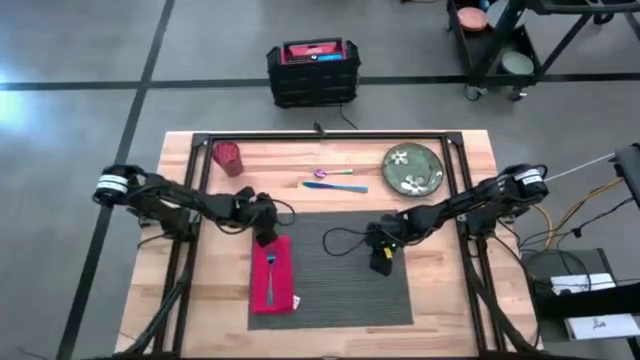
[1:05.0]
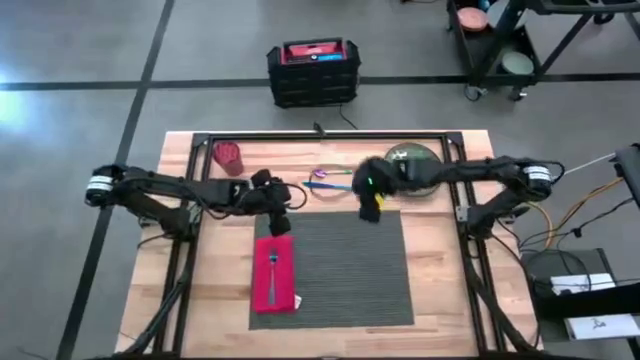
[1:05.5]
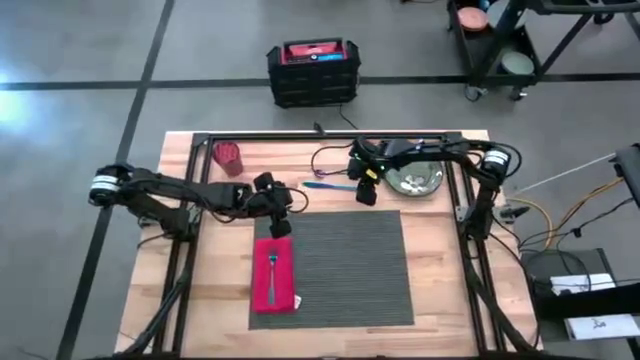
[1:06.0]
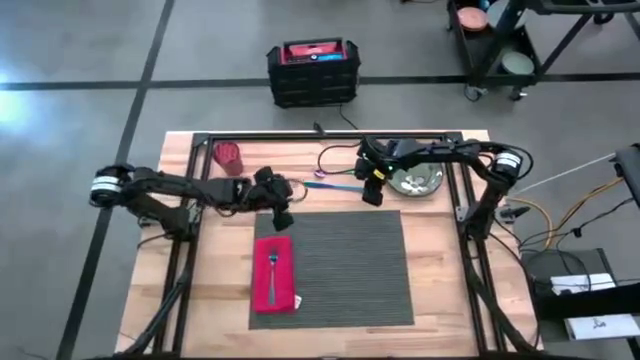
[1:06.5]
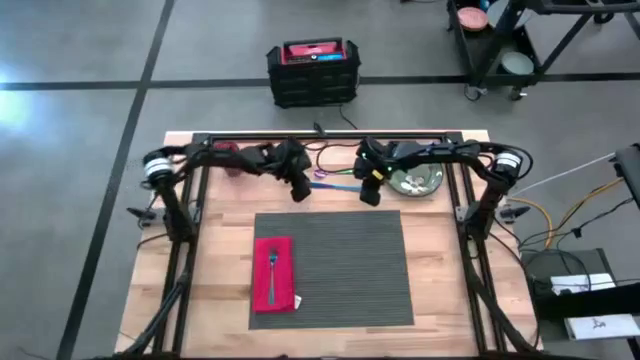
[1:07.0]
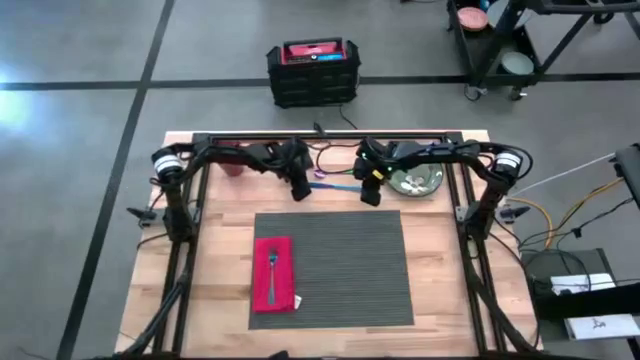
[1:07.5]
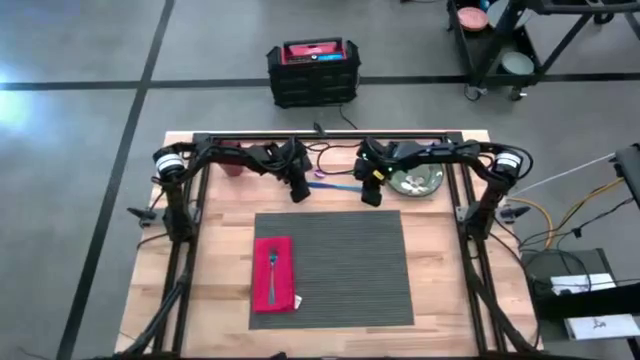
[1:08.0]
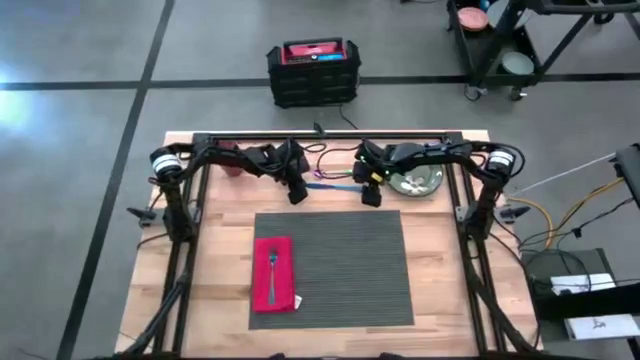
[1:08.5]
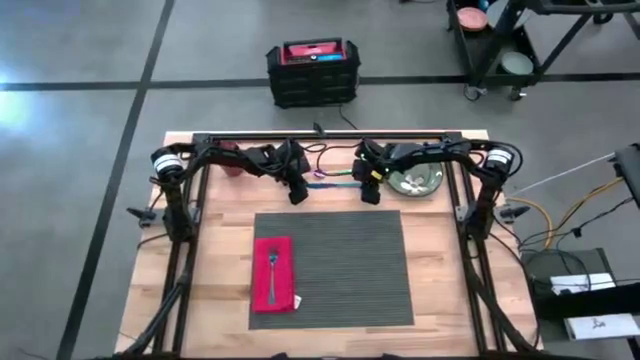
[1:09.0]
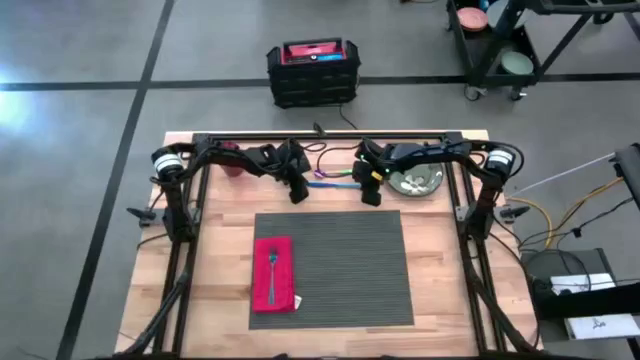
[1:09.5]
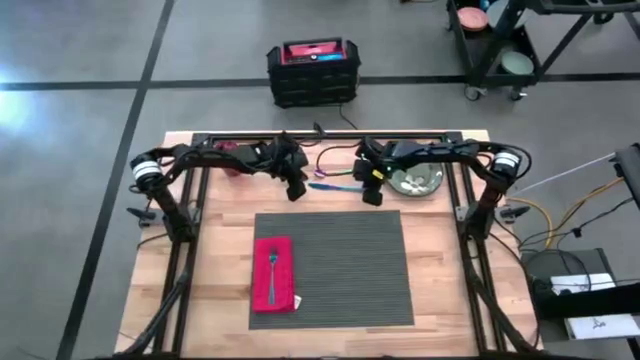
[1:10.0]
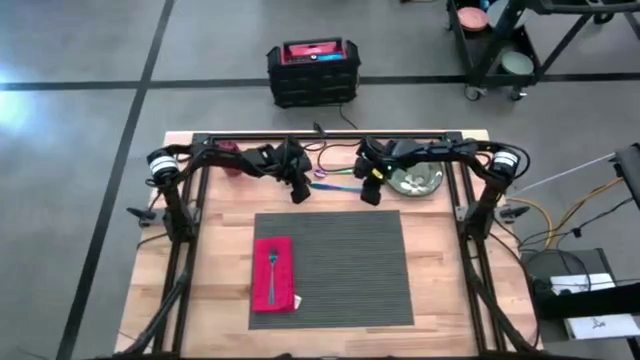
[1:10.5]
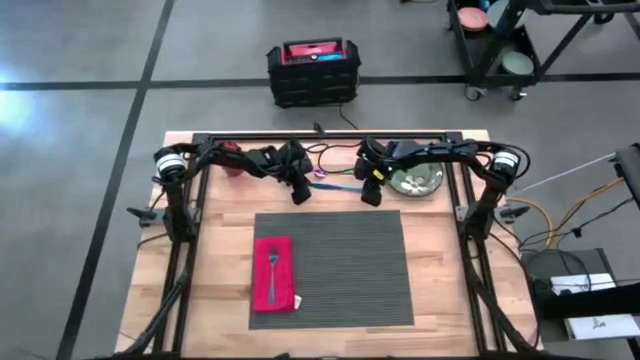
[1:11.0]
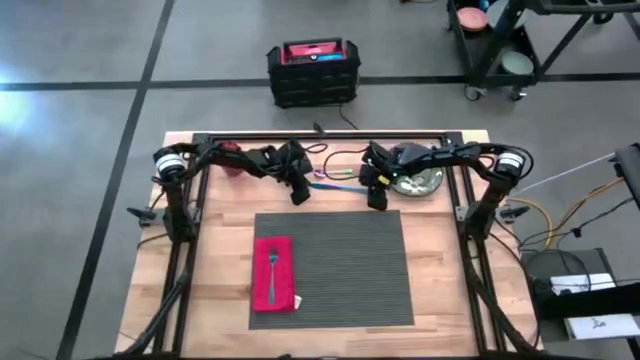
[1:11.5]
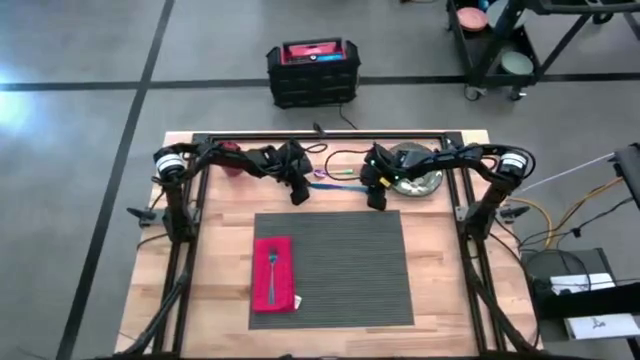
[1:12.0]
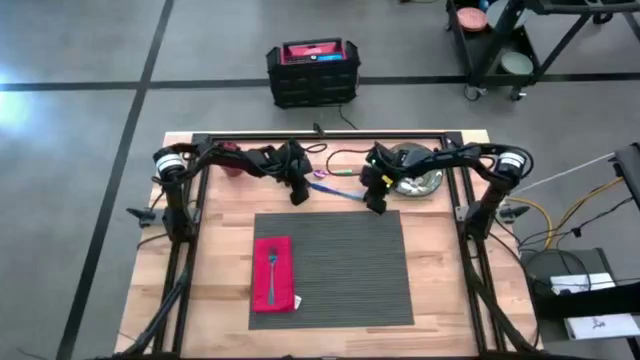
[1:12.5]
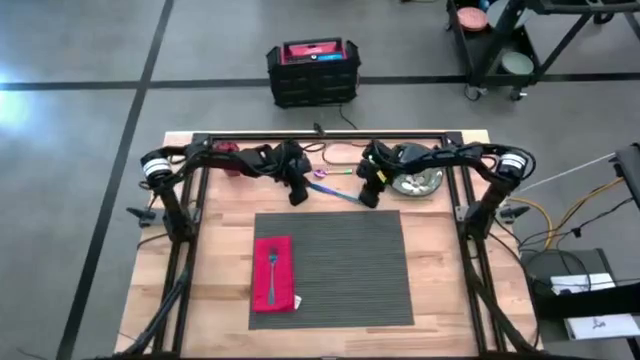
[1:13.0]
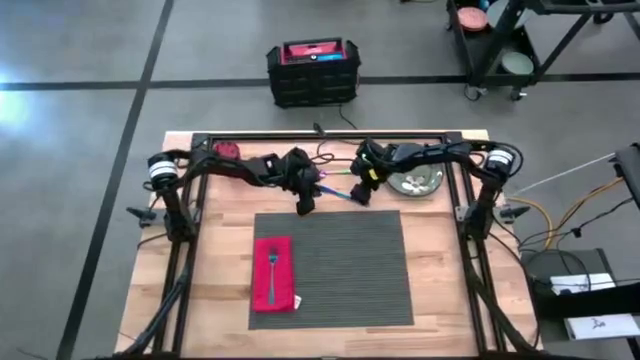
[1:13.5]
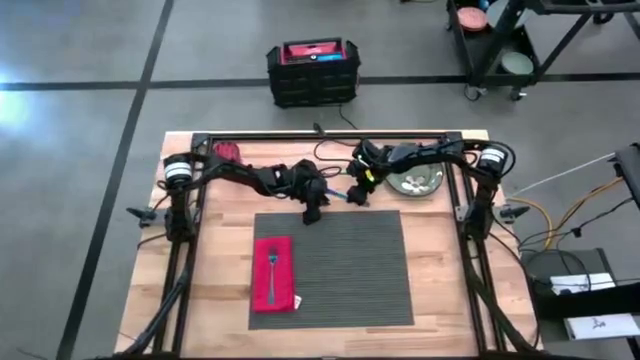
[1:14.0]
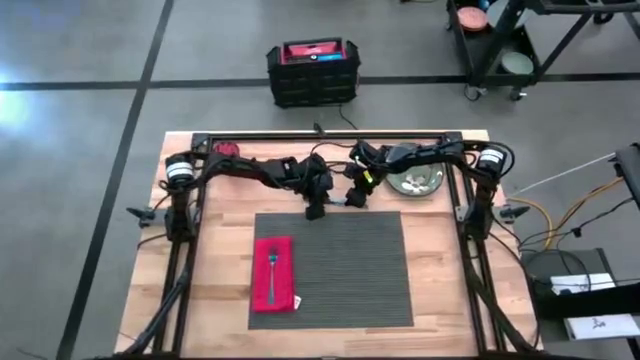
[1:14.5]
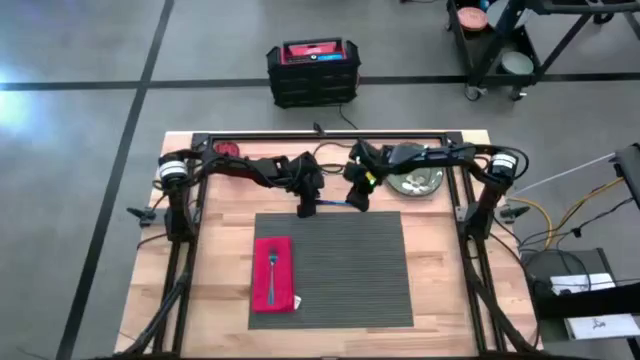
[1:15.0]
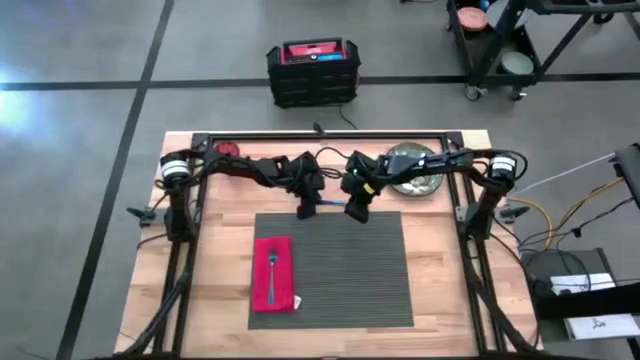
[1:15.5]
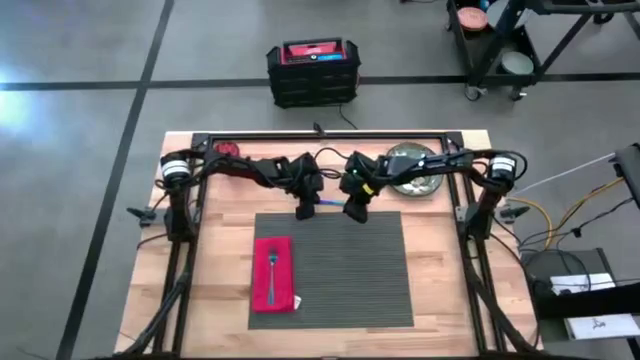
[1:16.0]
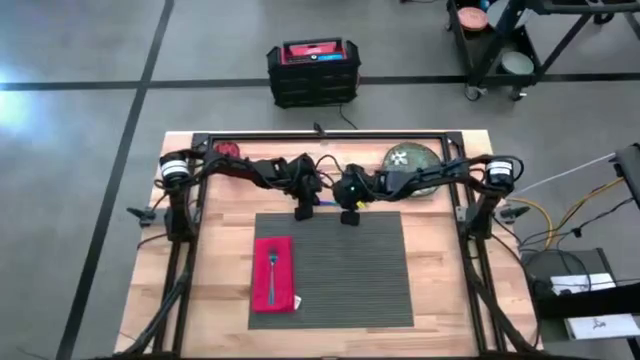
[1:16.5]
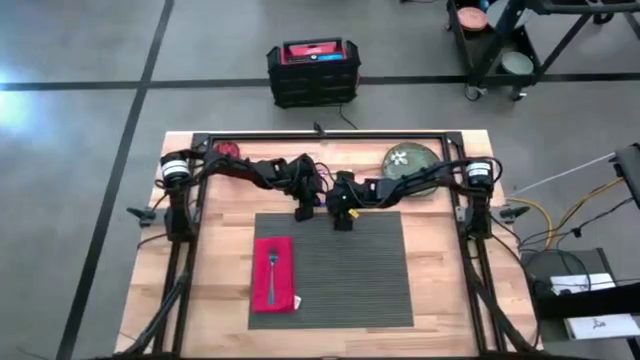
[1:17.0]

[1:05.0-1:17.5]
Task: Set table place
Put the blue knife on the right side of the table mat

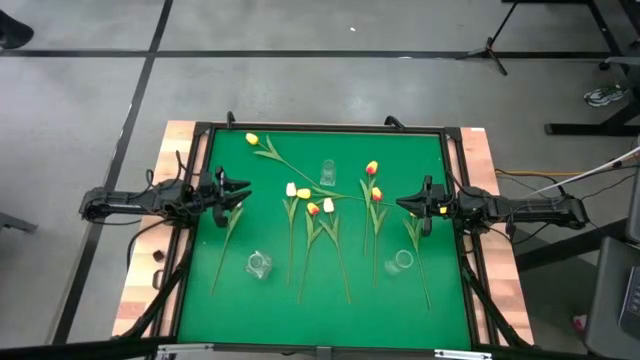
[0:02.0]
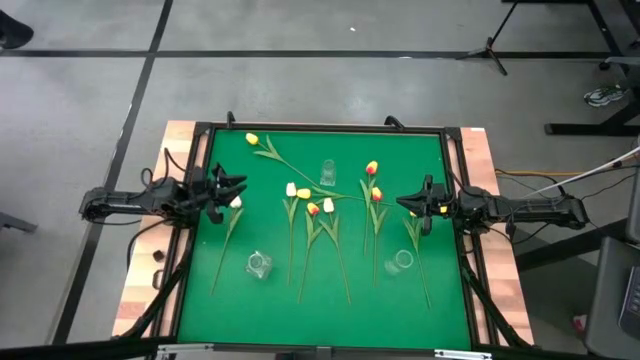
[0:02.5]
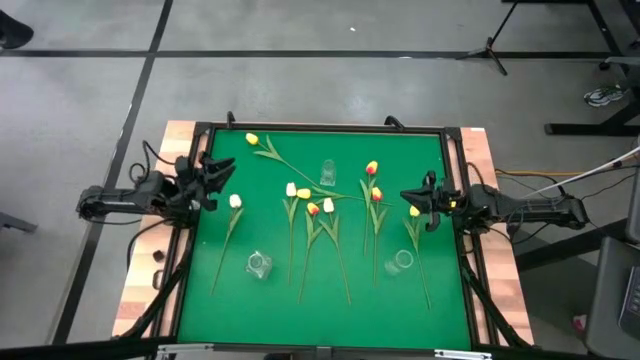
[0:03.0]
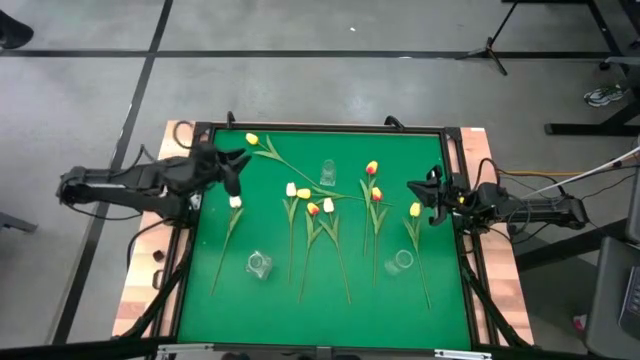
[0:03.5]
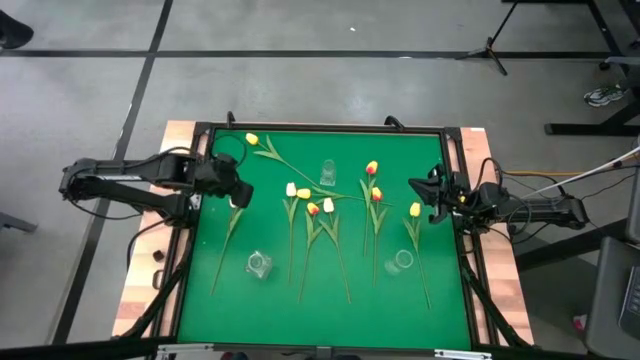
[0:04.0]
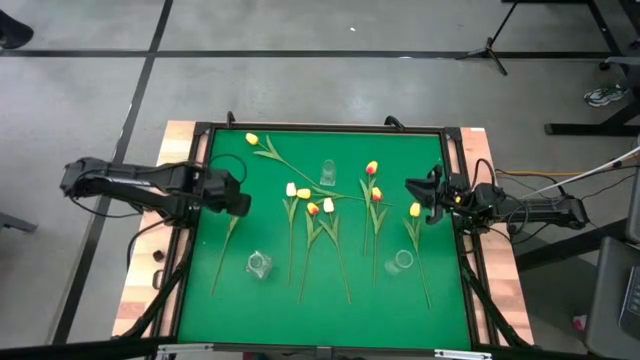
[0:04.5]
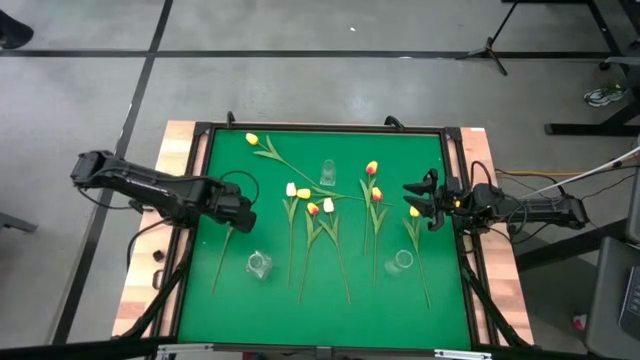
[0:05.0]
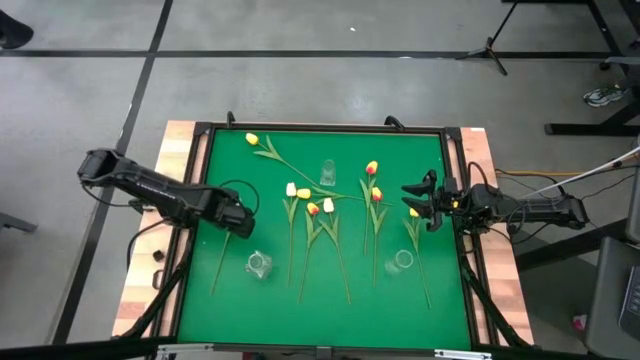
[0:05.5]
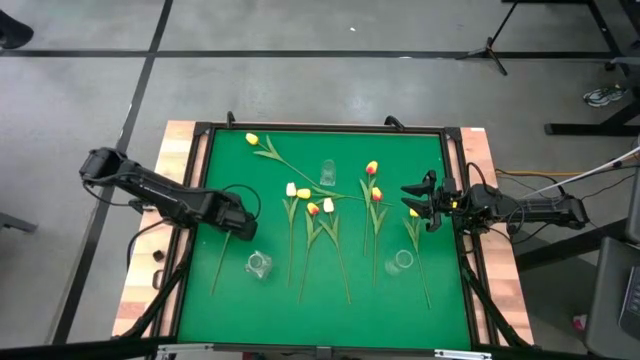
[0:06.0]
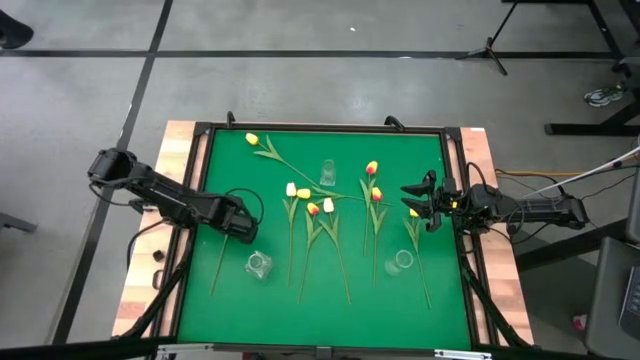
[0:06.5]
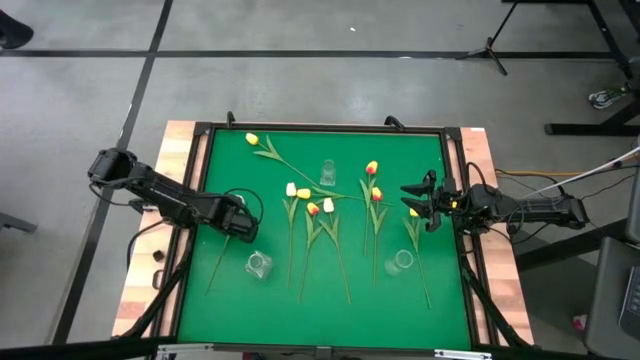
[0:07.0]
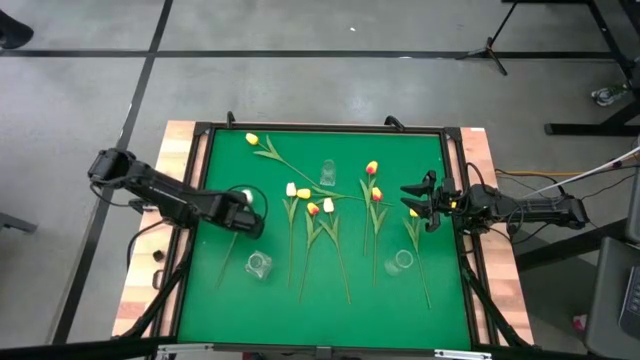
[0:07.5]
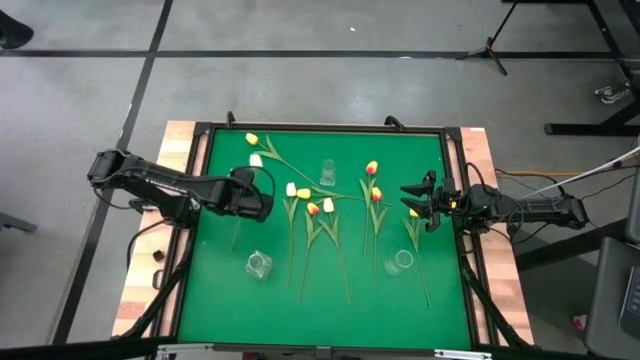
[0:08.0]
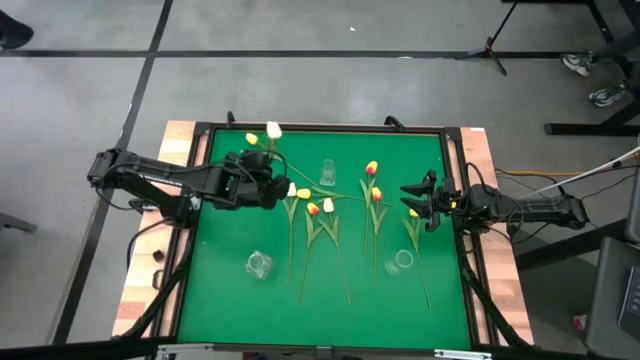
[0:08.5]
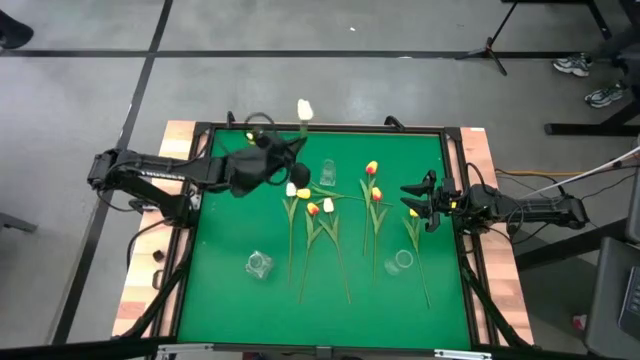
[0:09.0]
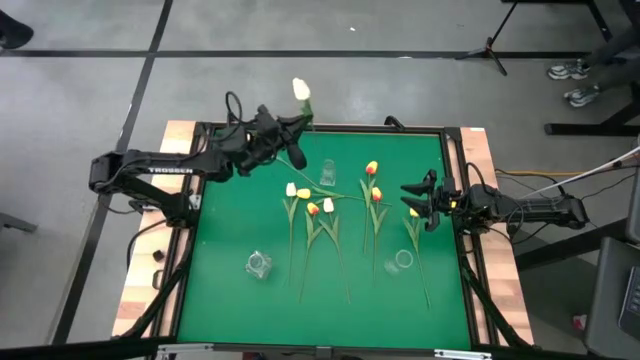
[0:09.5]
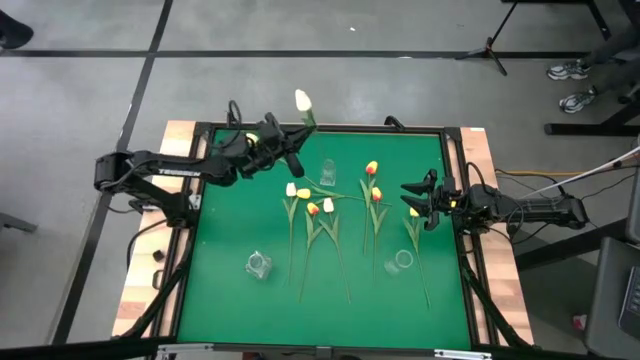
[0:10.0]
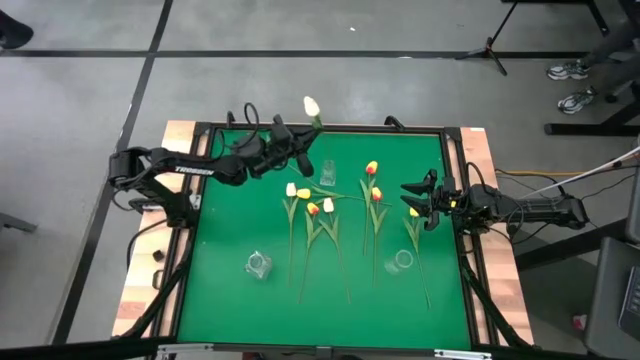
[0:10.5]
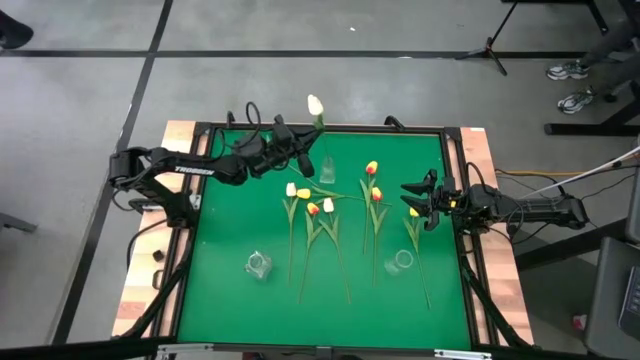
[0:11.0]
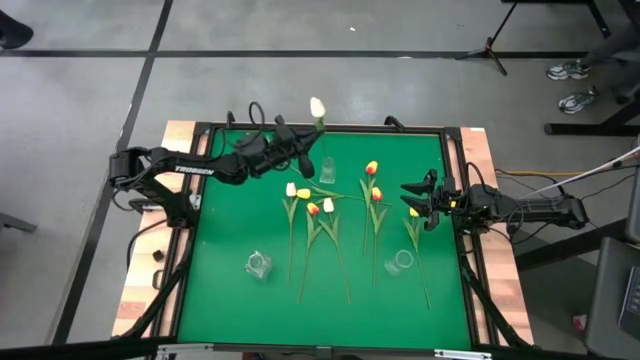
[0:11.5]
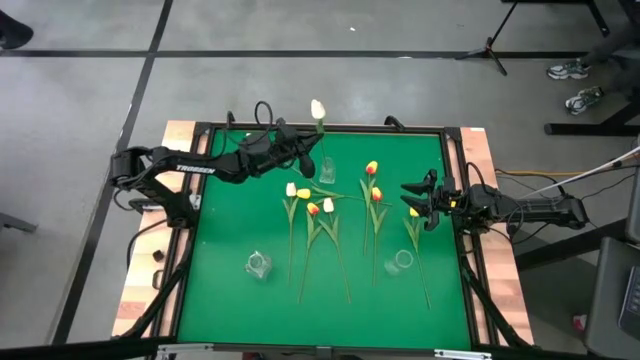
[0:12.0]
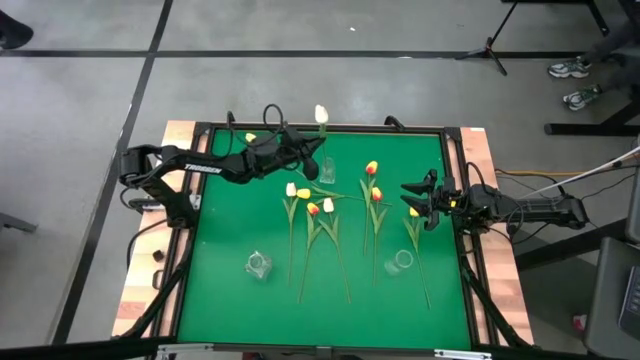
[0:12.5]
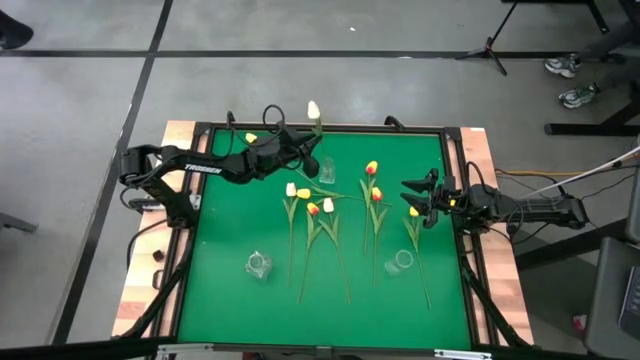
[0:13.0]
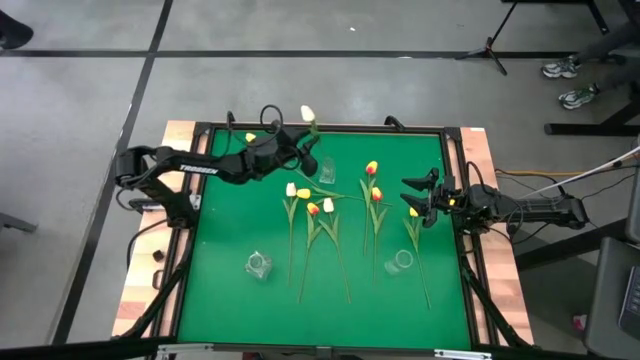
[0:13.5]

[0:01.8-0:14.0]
Task: Sort flowers into vase by color
Put the left white tulip into the top transparent vase
